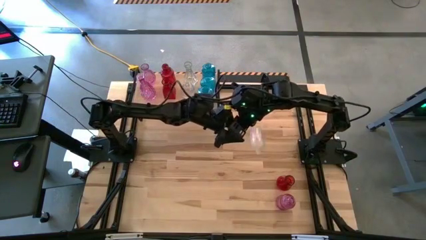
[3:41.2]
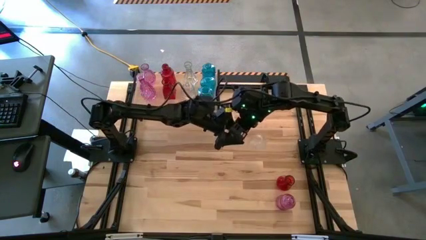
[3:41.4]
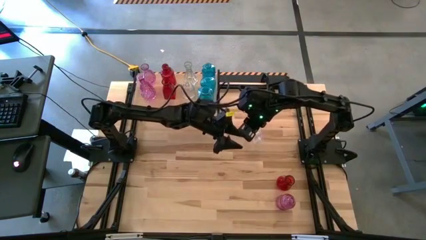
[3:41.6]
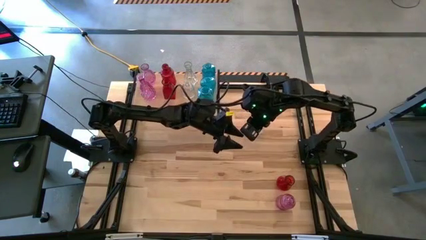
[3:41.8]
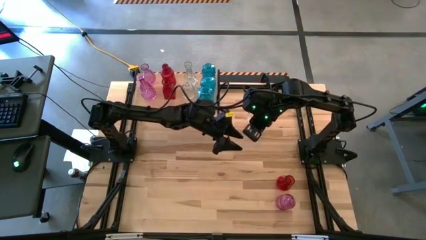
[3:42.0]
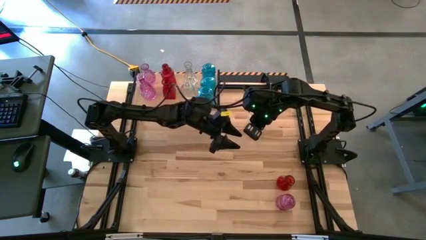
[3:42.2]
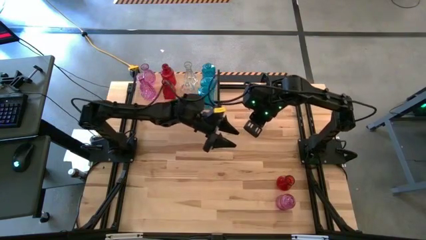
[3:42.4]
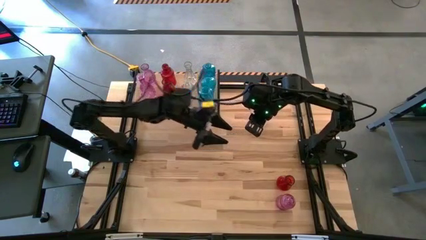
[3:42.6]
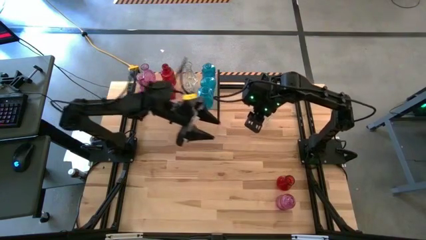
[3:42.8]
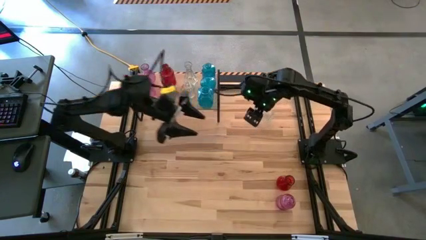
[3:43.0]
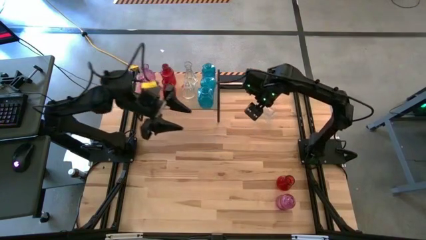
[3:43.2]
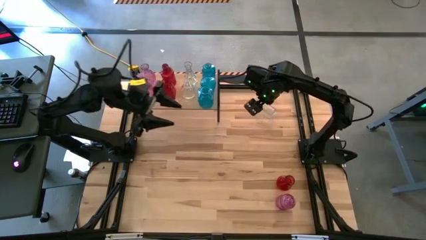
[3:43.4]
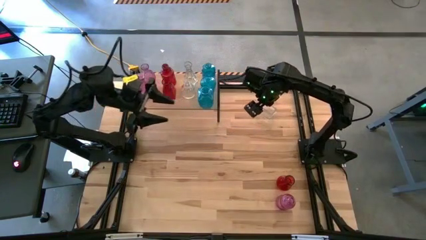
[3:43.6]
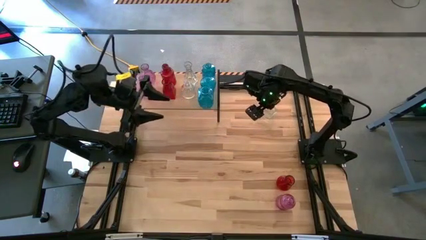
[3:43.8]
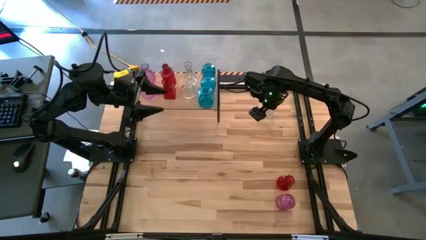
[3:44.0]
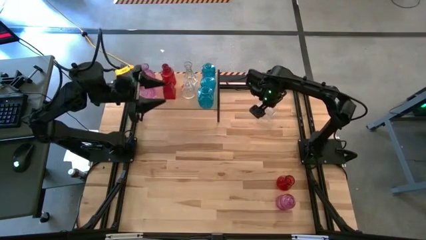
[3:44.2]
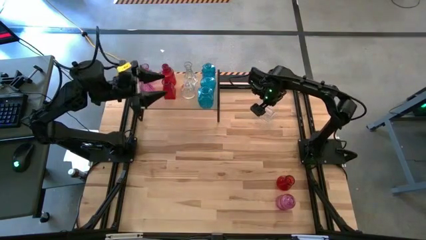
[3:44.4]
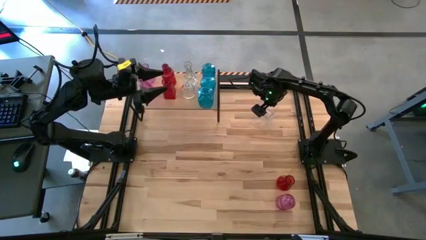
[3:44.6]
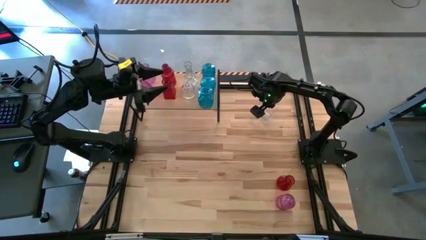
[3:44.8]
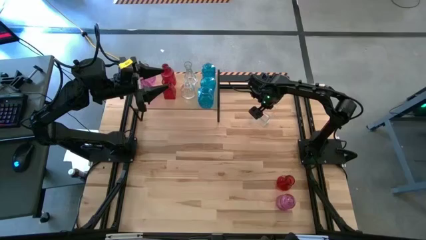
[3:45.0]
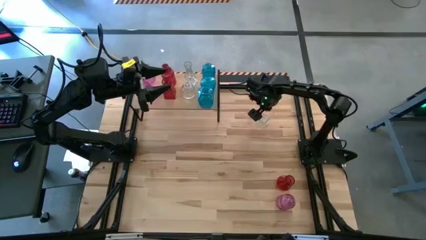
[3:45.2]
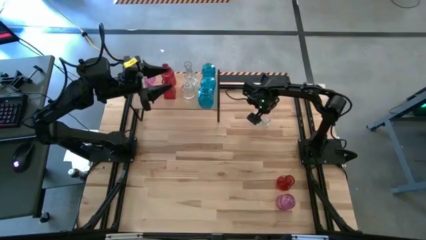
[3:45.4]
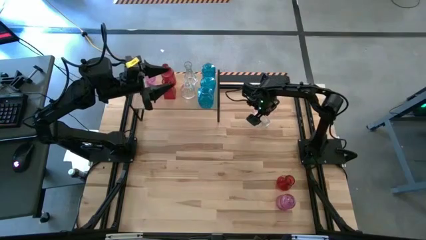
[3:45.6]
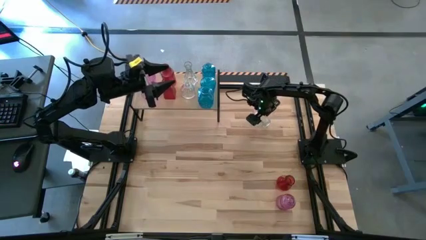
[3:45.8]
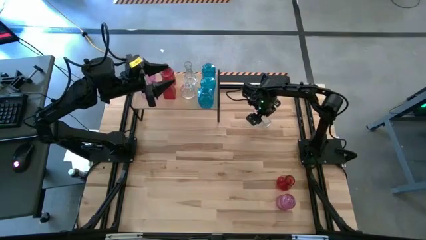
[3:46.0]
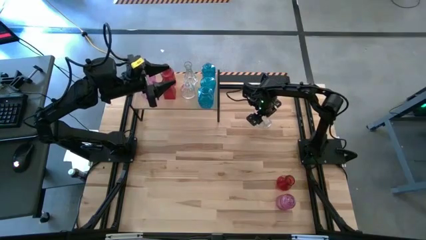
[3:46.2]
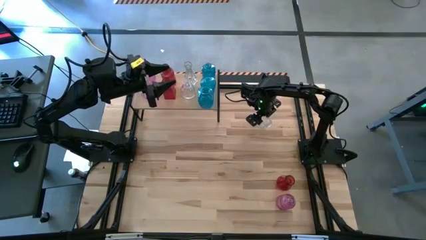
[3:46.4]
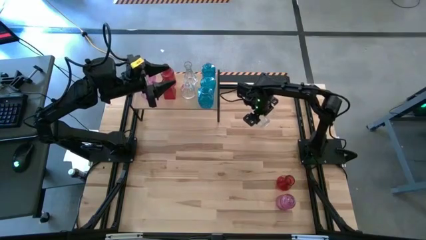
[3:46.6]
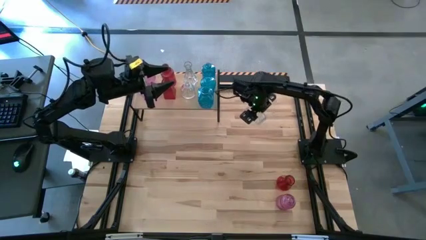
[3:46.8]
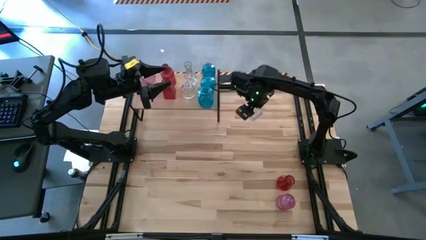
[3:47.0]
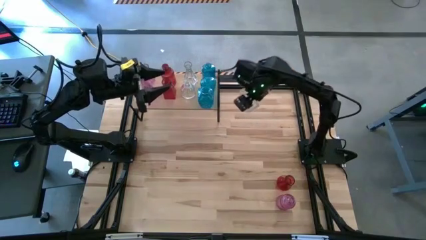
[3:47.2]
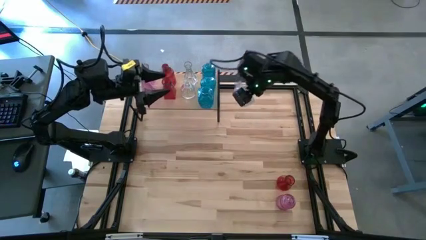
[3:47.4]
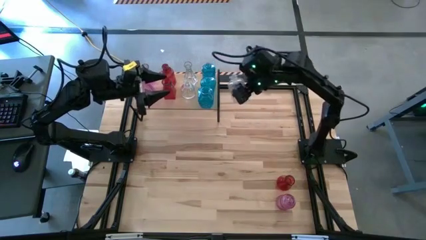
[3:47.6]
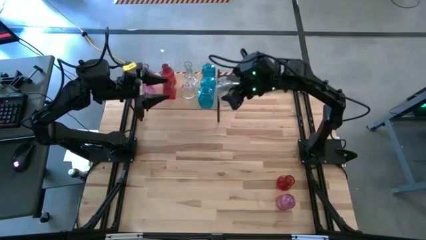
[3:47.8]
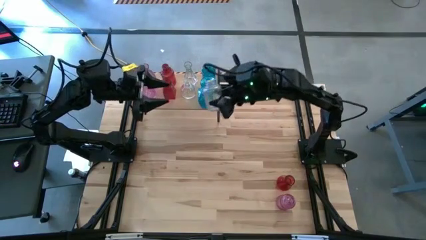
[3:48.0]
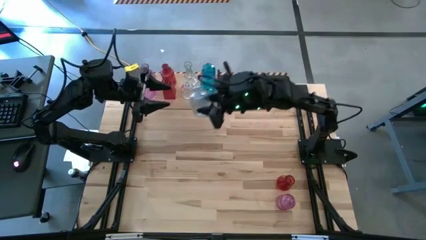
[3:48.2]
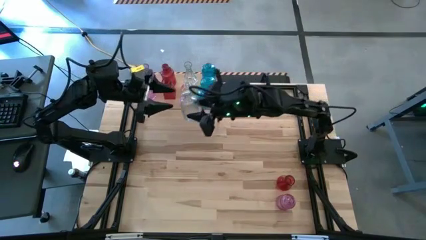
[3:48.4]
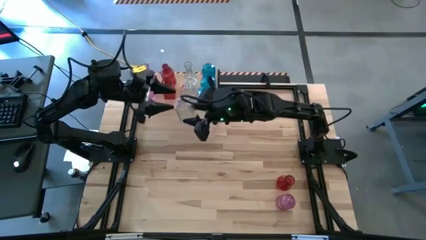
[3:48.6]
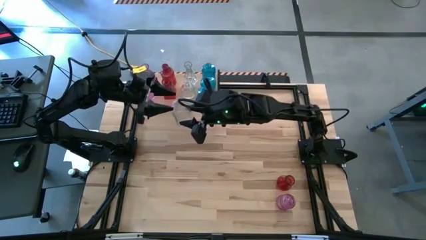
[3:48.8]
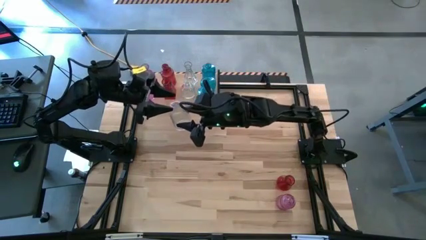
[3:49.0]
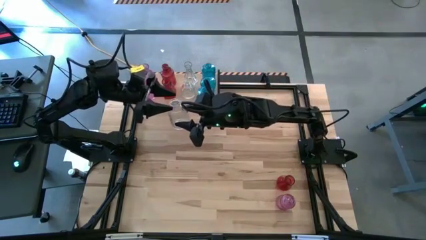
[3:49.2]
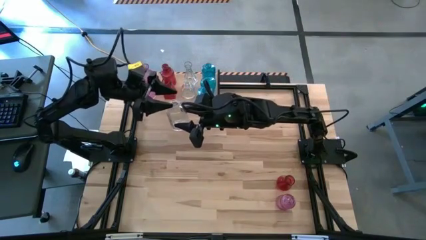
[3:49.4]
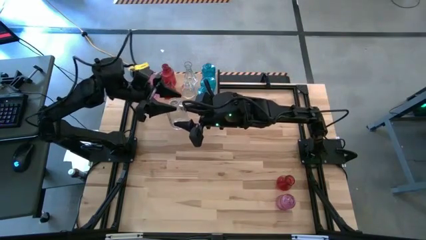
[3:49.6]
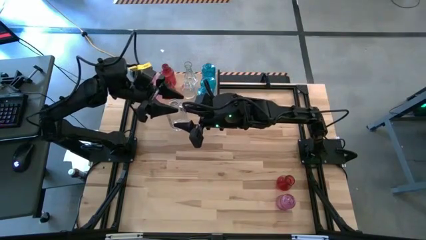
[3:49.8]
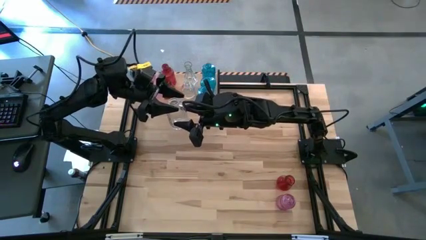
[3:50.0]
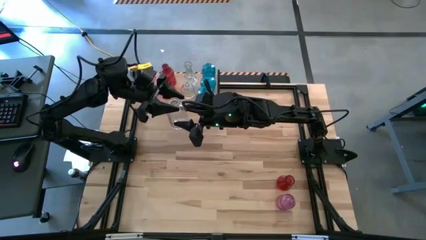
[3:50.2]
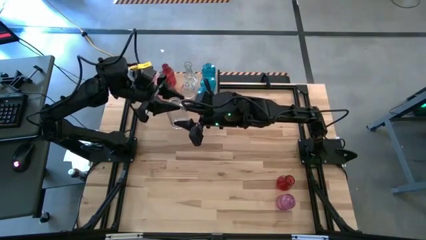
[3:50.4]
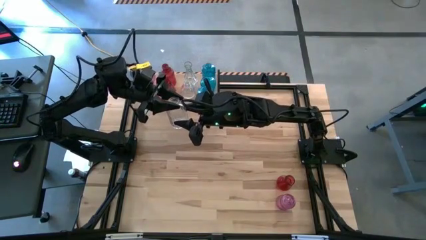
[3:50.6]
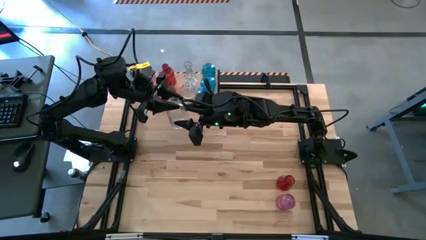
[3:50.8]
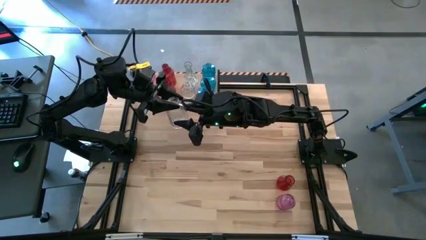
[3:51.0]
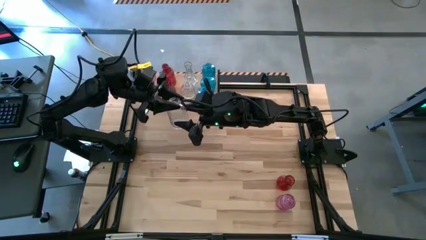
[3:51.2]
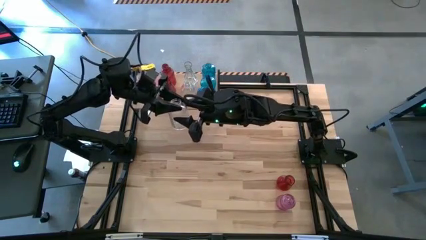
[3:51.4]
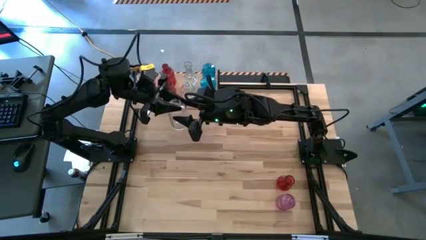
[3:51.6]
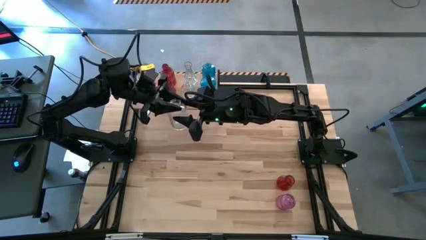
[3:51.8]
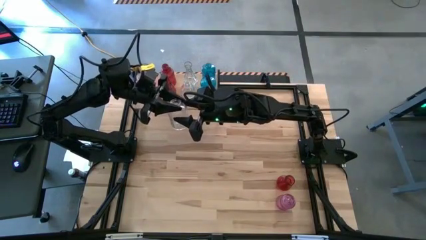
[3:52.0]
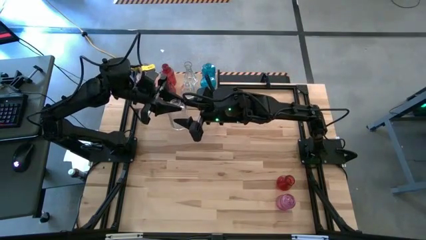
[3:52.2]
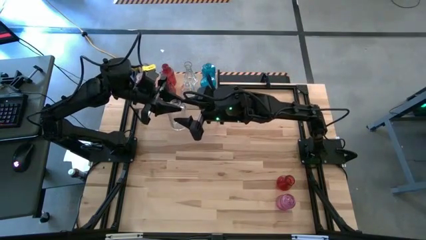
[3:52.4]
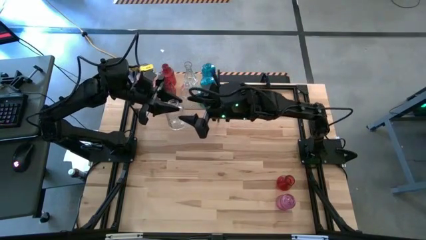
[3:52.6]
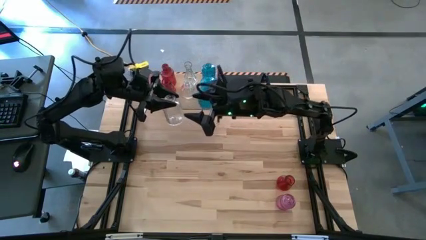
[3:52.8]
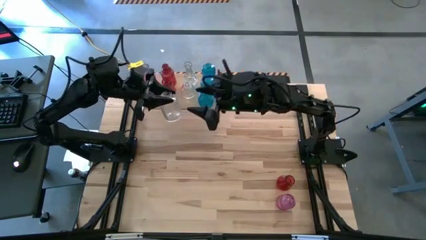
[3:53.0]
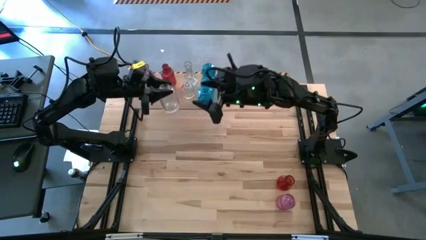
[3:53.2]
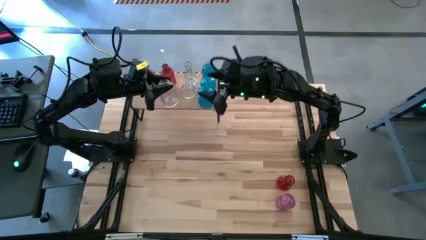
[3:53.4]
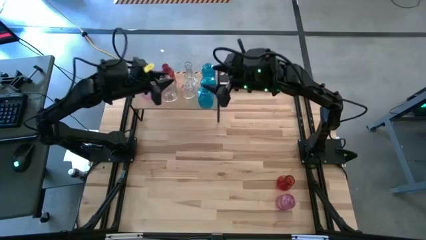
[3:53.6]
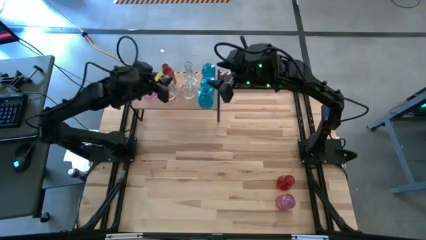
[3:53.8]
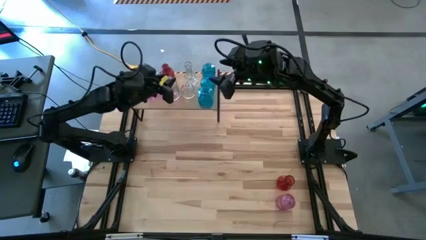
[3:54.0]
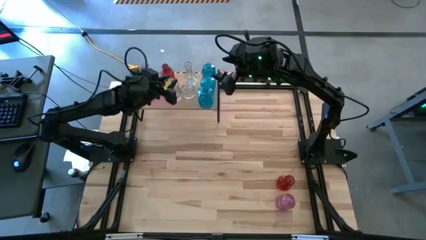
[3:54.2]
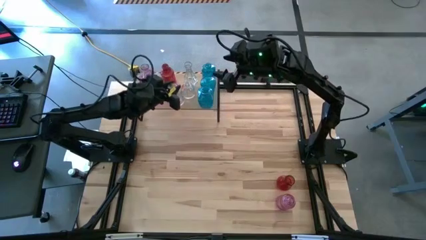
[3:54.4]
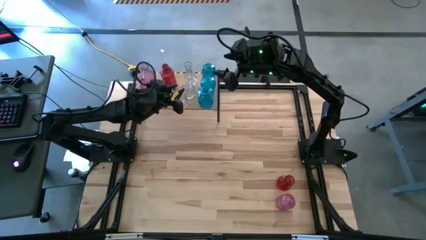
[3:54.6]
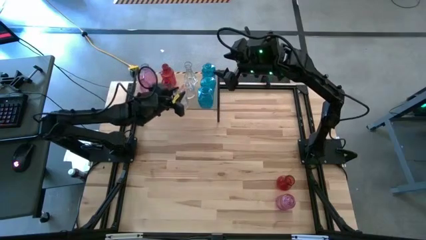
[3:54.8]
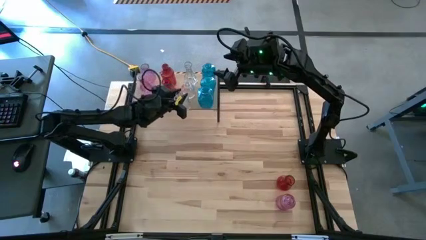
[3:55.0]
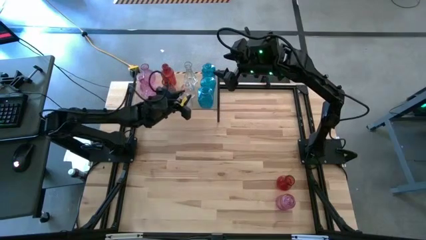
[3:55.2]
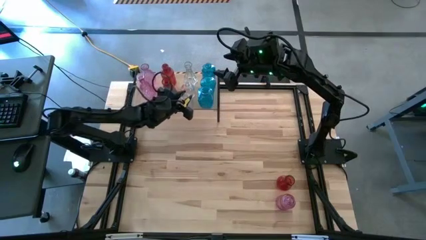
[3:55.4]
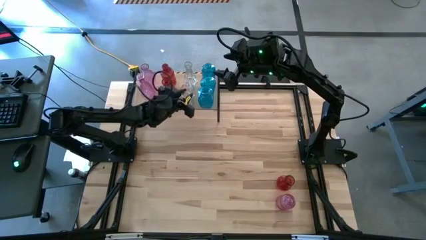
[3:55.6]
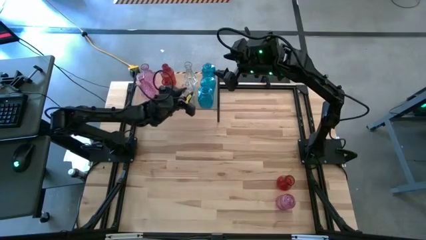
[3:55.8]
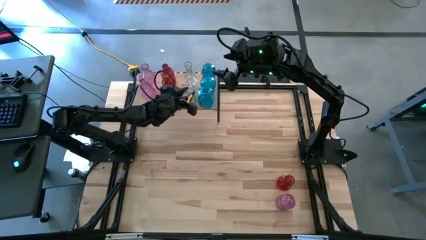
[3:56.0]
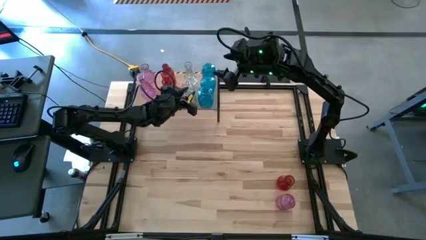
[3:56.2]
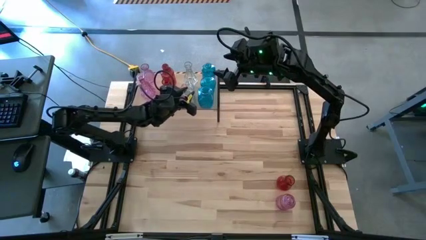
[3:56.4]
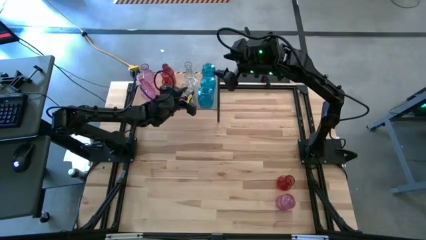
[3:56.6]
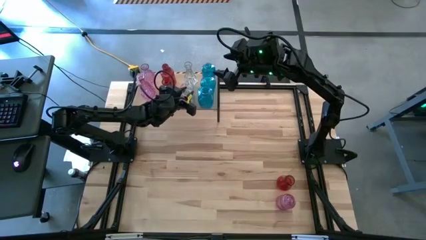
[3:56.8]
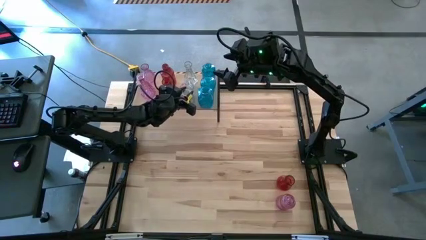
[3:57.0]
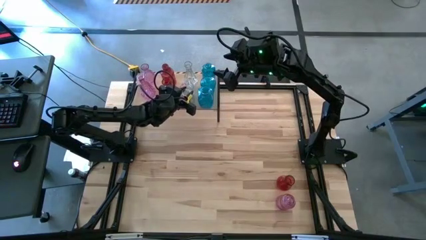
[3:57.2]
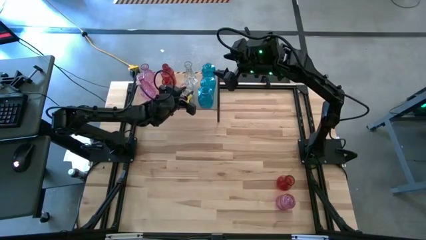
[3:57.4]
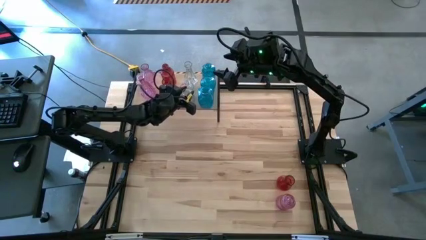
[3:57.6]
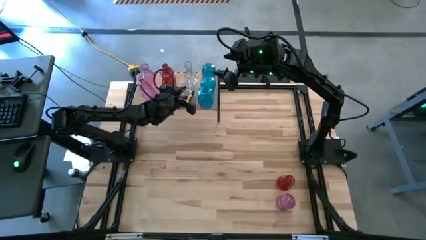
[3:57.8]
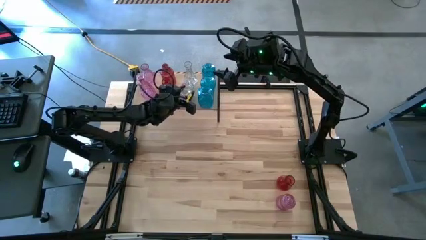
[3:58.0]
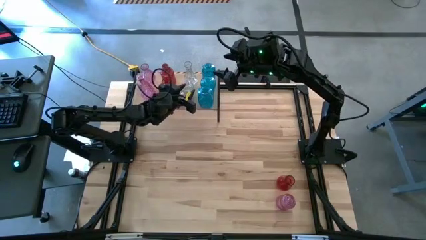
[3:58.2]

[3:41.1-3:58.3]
Task: sort vases onto shelf
Put the transparent vase on the shelf aligned with the other transparent vases
